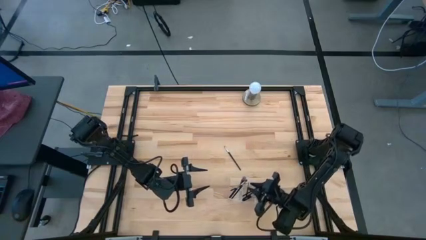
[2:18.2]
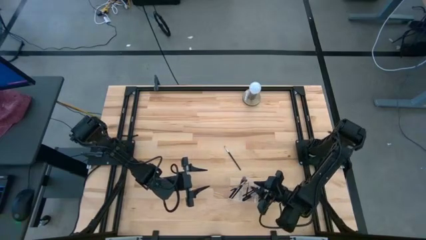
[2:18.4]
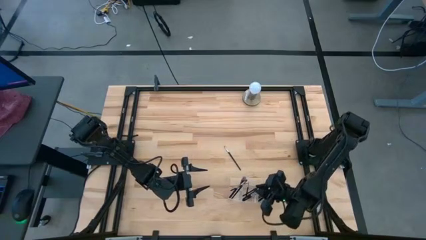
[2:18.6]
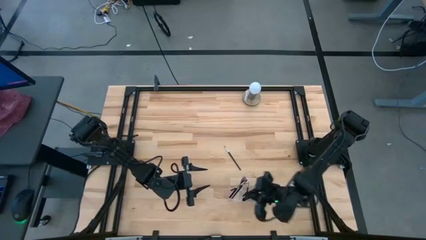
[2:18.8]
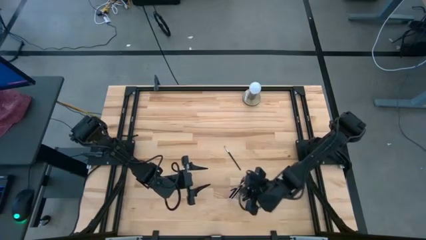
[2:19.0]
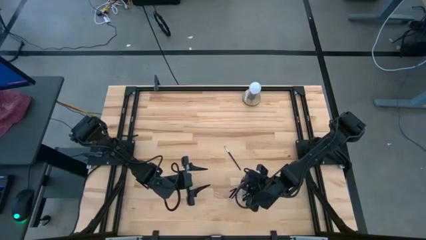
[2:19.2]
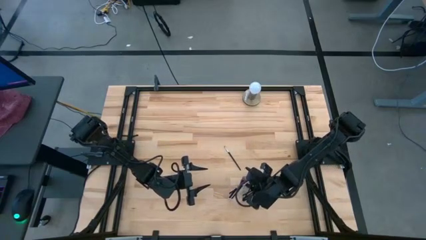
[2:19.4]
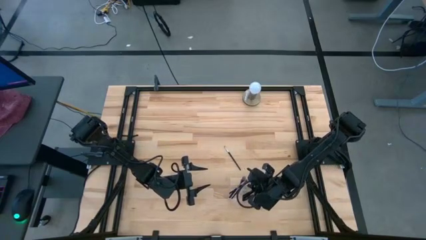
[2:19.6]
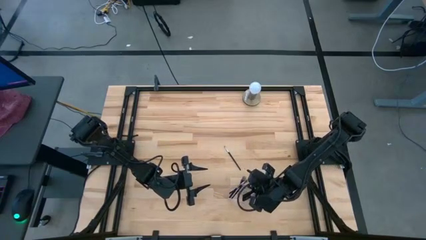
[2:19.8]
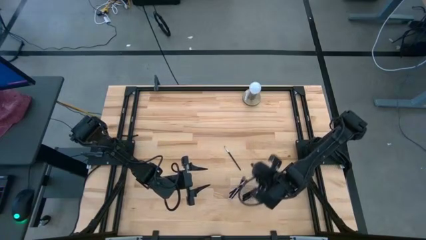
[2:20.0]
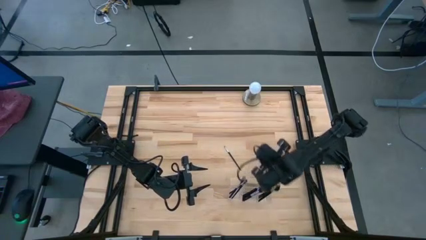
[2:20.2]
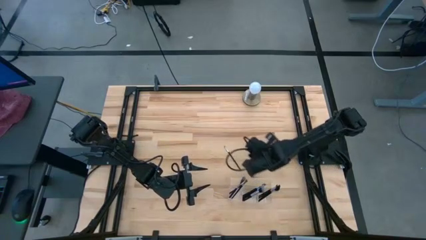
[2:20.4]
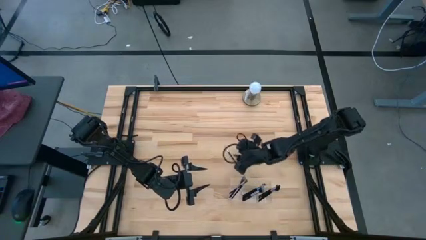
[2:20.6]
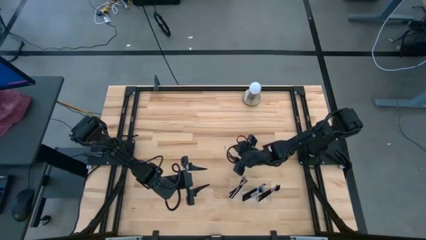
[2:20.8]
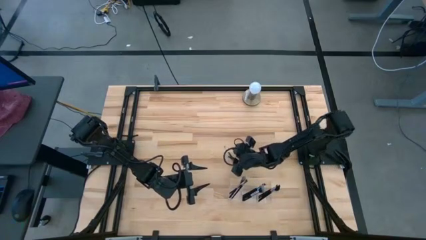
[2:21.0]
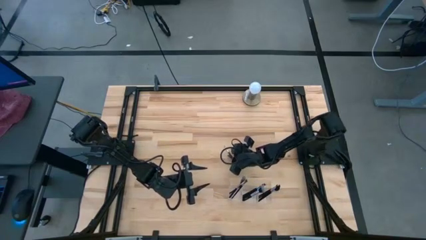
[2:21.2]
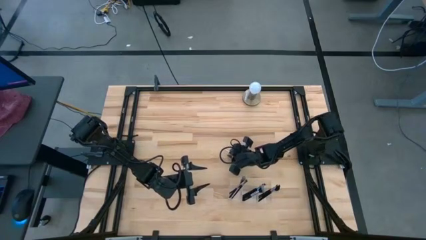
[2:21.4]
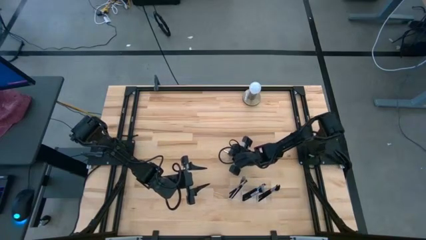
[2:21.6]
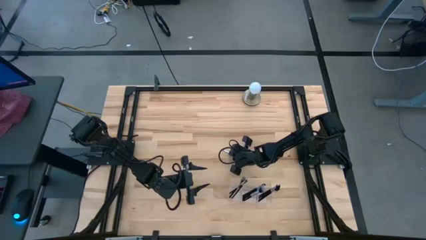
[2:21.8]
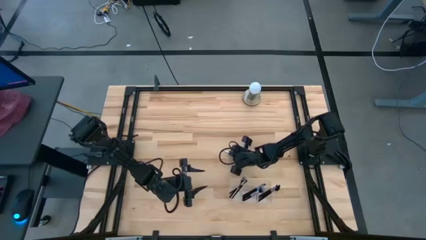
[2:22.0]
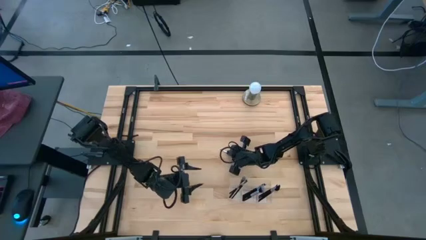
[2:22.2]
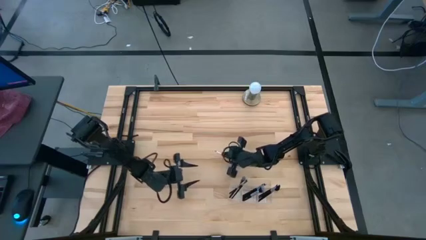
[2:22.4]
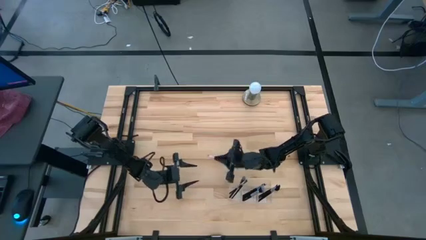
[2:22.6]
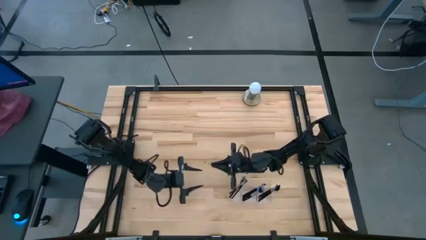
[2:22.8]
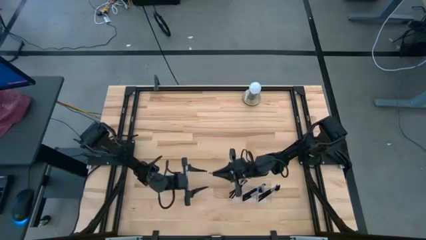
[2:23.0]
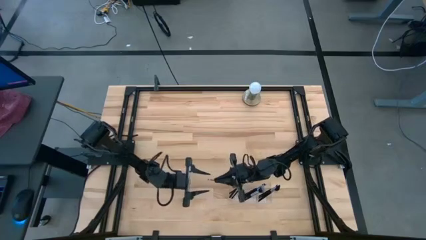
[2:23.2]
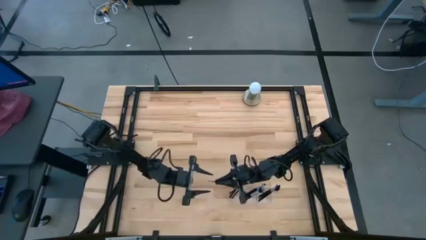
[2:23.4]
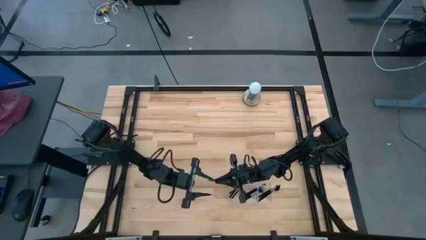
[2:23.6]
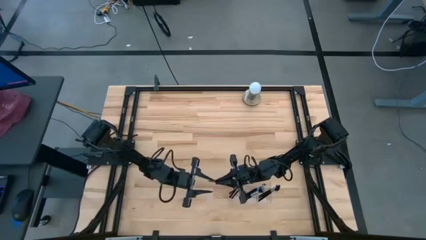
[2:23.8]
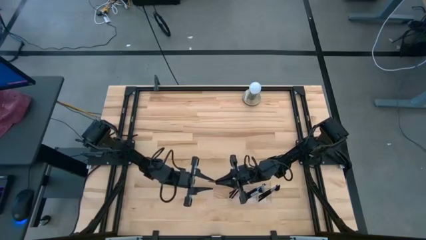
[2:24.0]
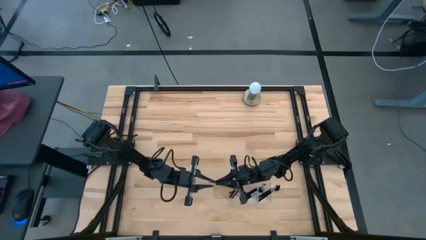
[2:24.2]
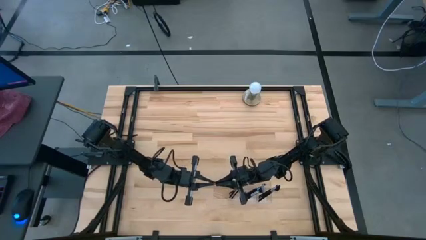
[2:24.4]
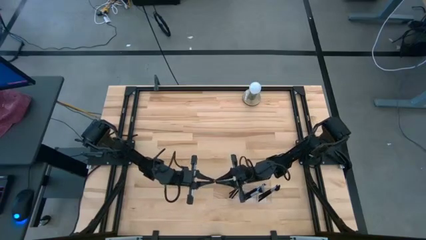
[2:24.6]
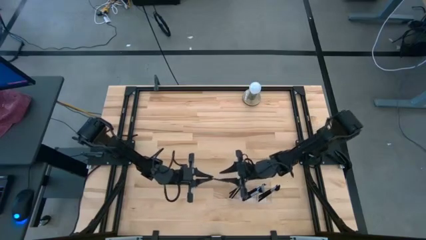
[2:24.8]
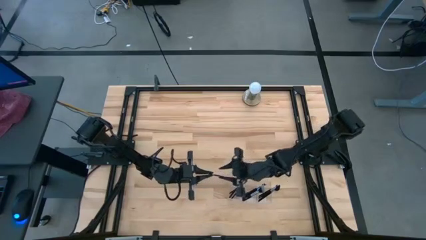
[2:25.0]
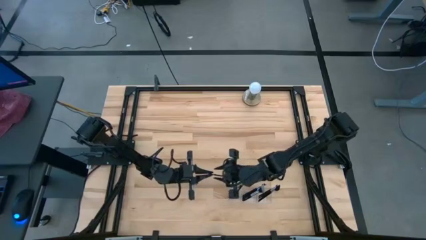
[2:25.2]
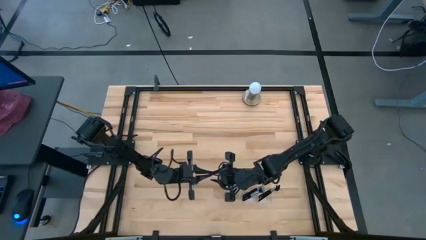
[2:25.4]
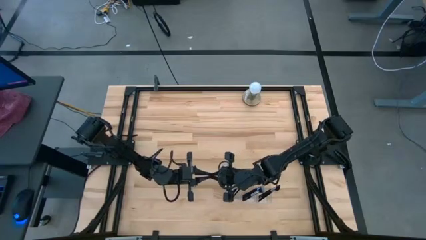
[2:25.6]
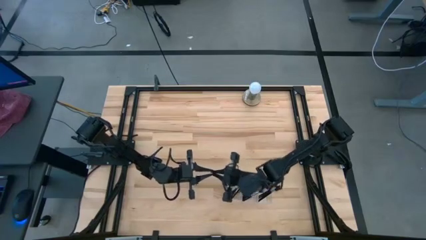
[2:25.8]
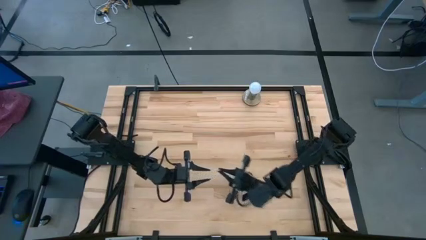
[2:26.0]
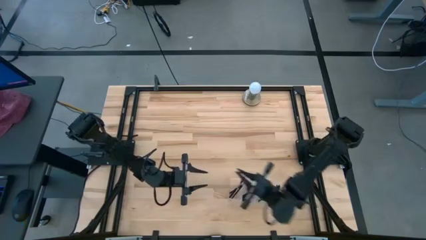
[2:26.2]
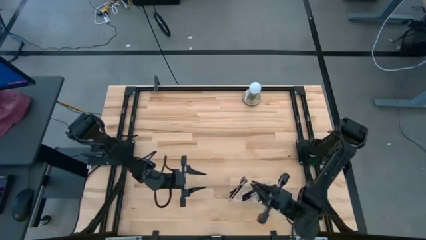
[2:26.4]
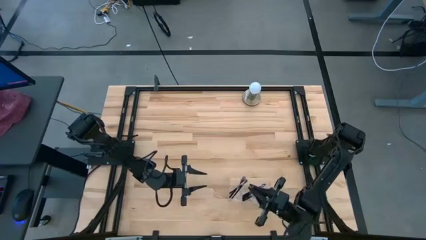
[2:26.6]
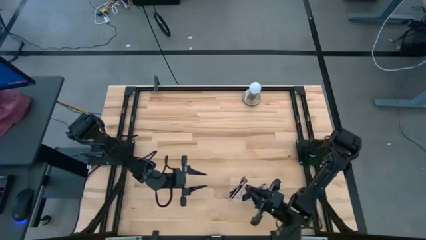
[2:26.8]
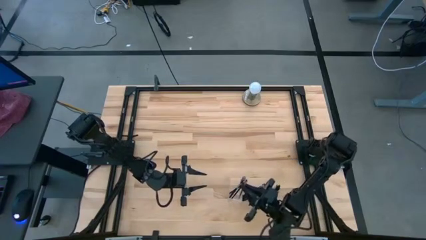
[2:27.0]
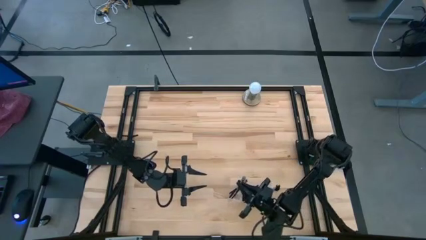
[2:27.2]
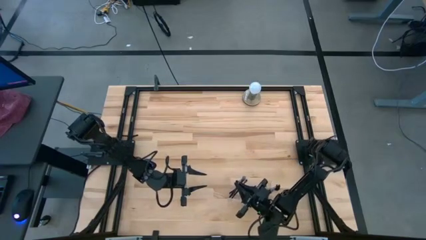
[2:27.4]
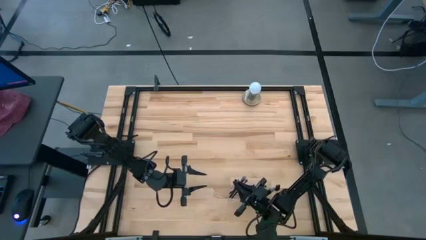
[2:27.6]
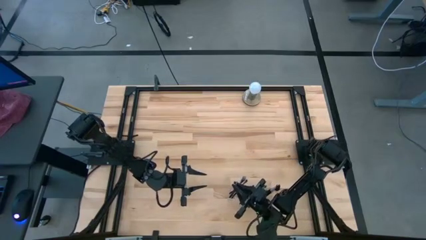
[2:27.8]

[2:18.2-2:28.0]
Task: Put items in baskets/containers
Put the eyeshadow brush into the left section of the transparent organizer

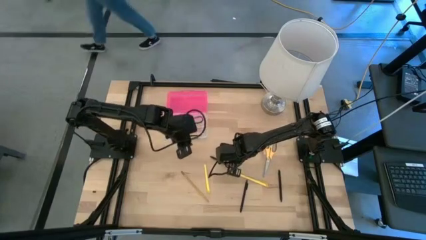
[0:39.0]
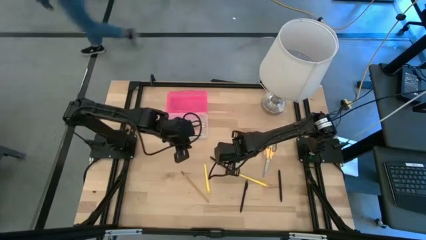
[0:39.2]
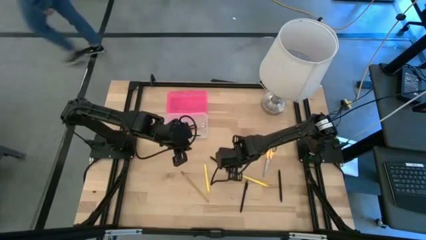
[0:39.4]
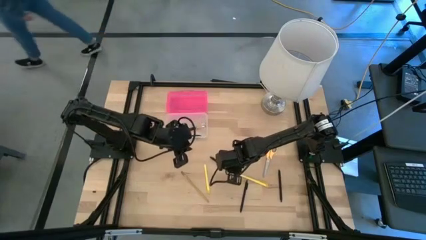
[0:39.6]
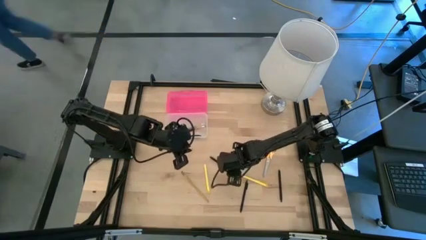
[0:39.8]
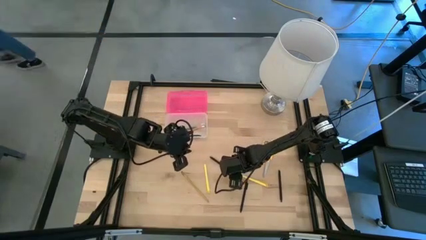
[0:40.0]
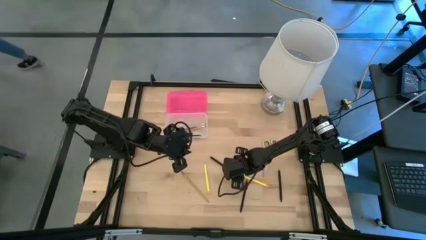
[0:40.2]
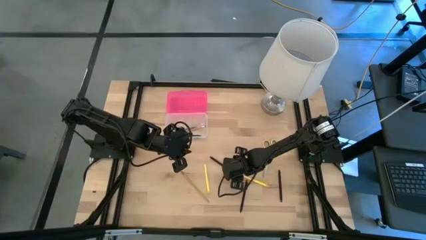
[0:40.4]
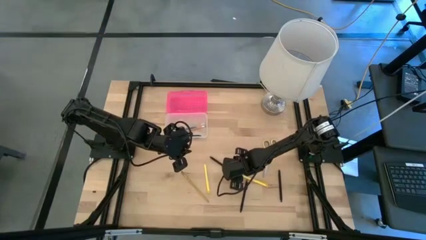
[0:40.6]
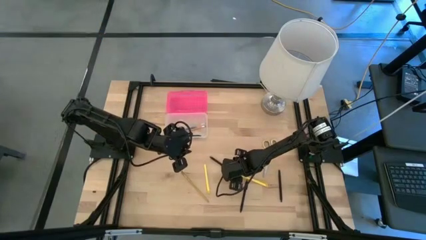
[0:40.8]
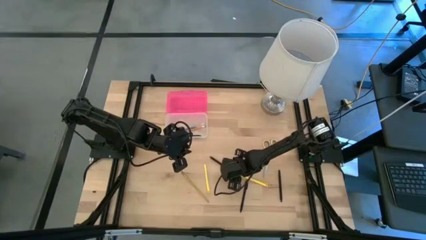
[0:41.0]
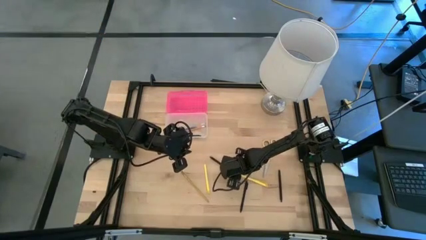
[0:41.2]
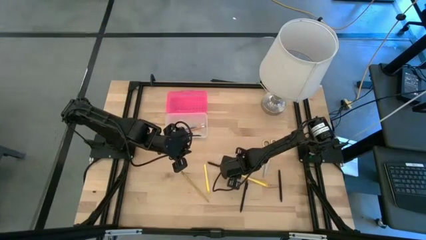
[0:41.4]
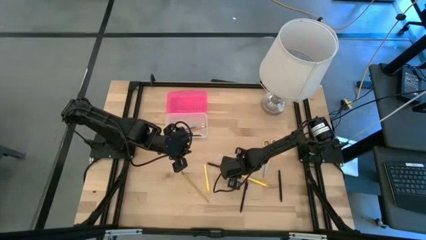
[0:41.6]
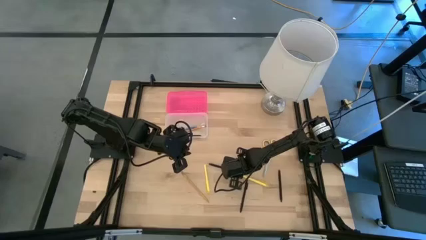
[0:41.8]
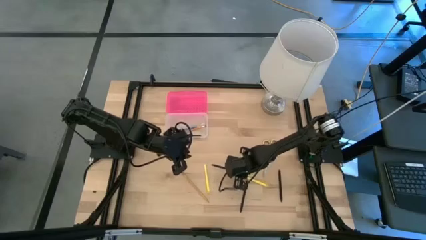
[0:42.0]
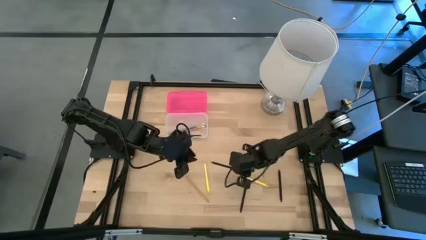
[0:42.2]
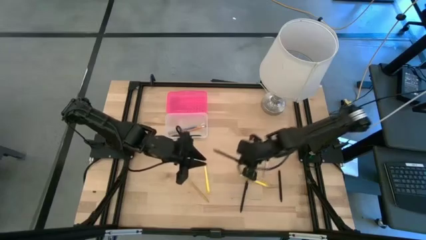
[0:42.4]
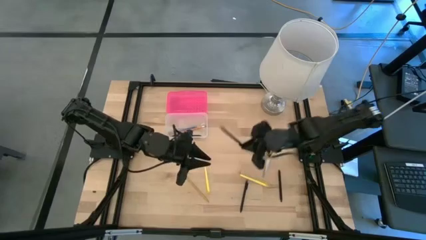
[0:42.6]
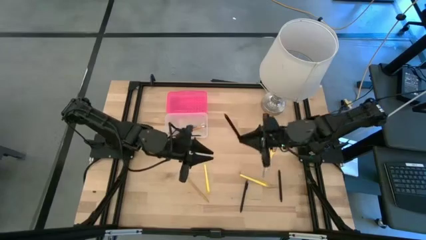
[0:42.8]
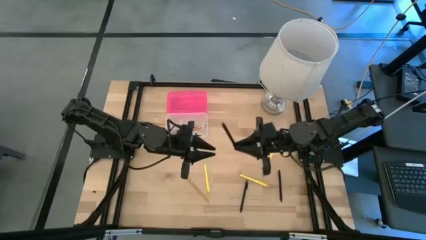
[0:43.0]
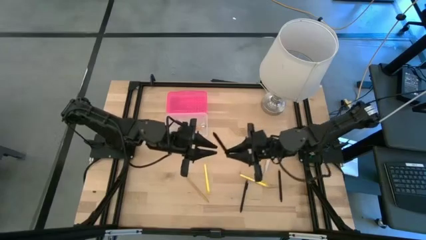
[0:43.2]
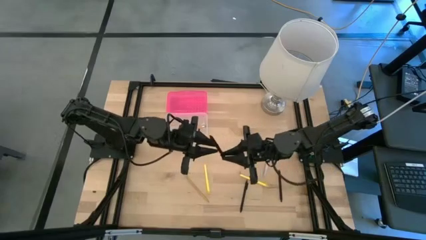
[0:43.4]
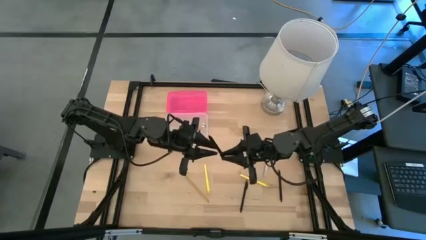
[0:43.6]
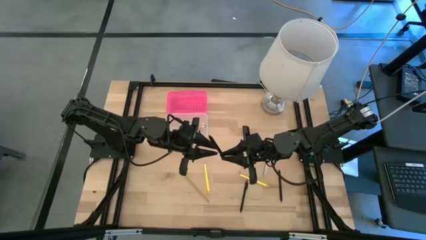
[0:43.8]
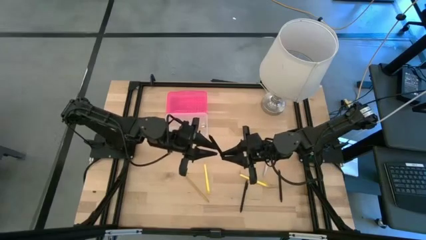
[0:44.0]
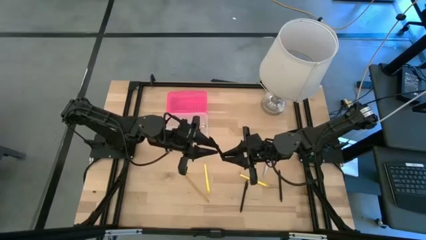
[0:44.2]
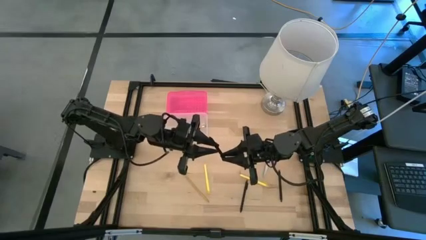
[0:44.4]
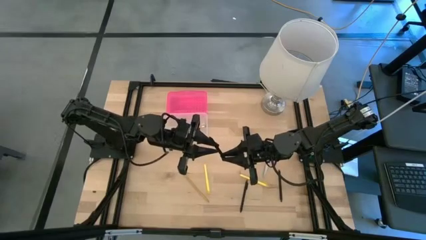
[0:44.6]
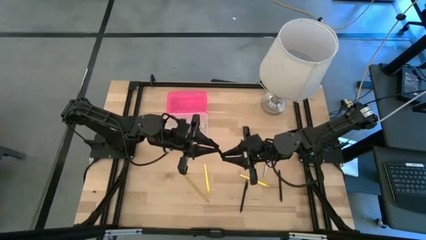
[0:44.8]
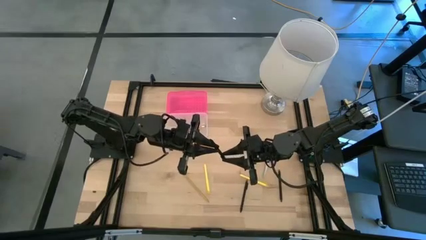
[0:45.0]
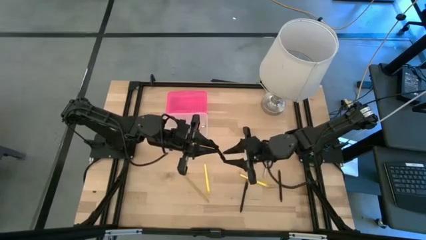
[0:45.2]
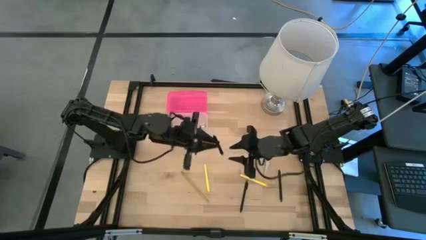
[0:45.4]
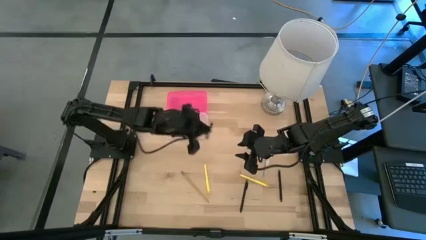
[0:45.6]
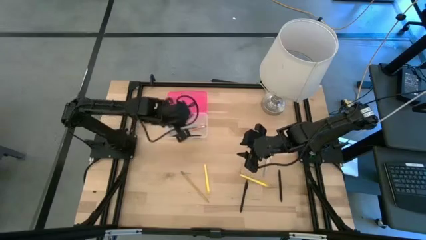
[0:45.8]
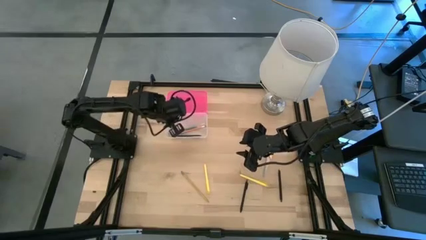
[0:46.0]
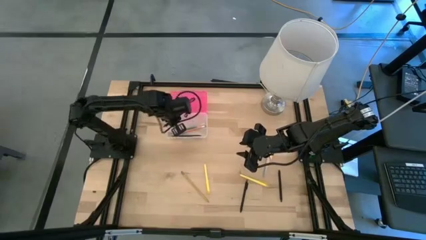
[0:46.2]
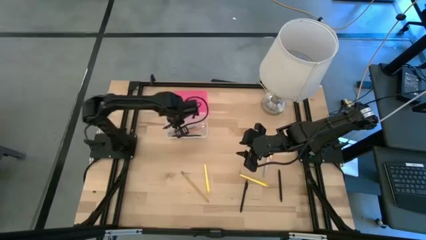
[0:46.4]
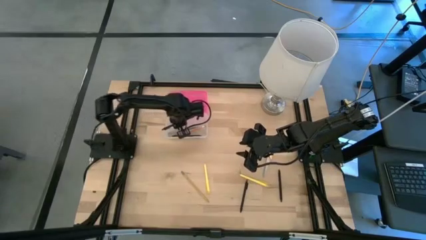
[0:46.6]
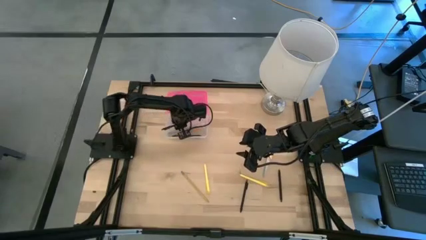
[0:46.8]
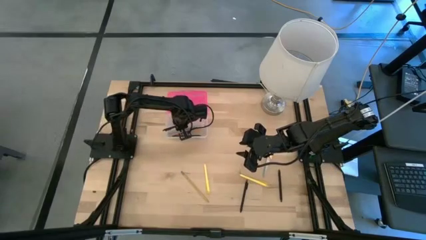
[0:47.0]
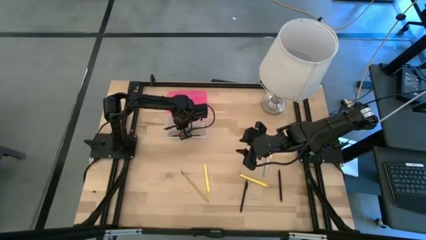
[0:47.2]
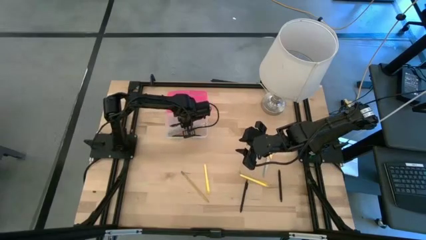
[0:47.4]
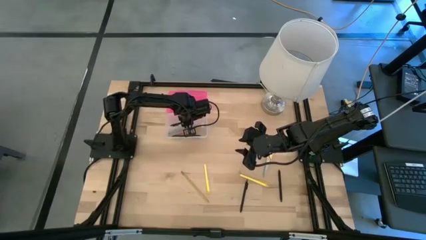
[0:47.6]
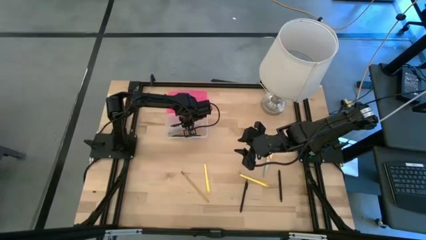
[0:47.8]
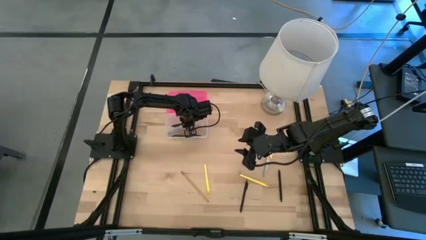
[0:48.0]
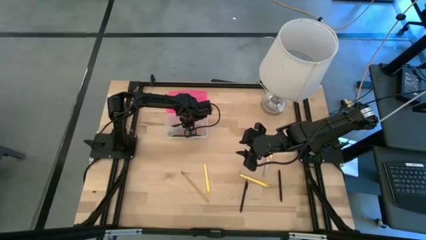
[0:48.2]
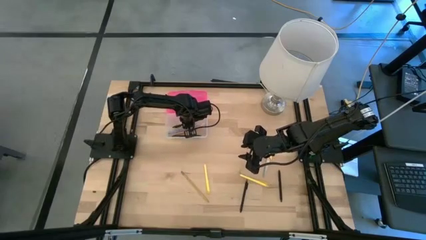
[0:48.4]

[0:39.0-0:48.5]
Task: Pick & place school supplies into a supply box
Put the black pen into the pink supply box
